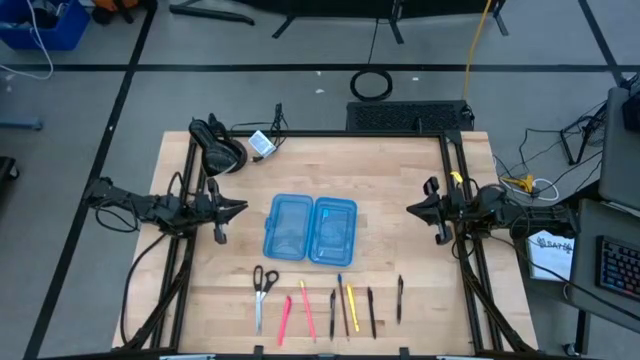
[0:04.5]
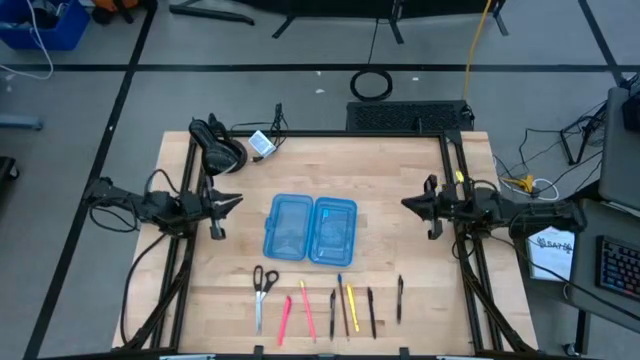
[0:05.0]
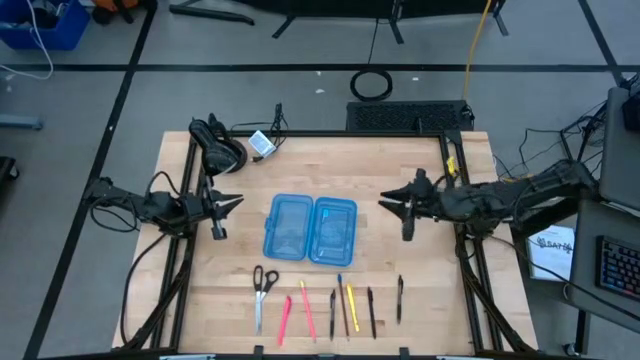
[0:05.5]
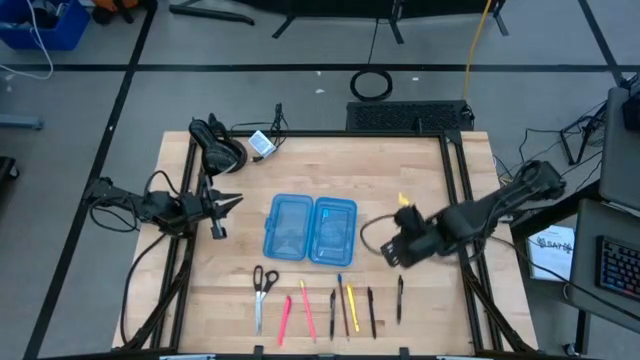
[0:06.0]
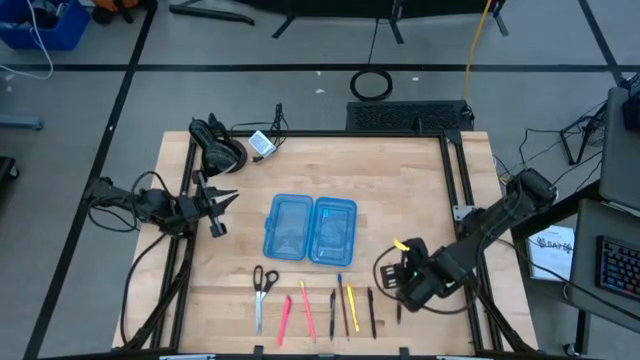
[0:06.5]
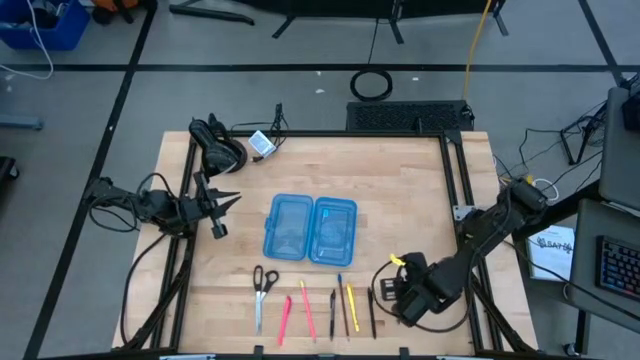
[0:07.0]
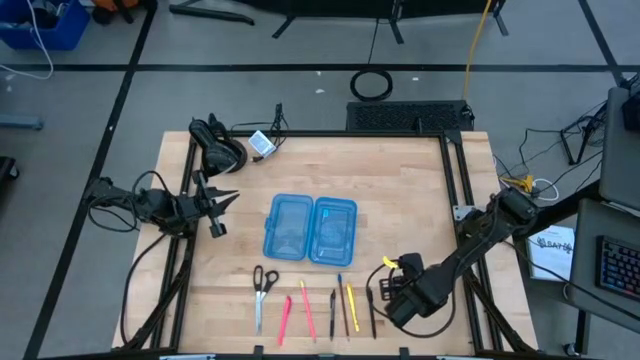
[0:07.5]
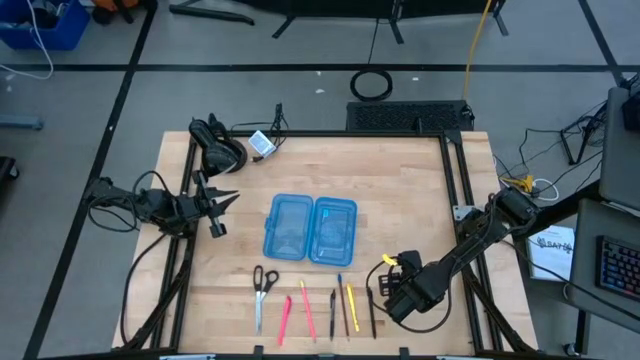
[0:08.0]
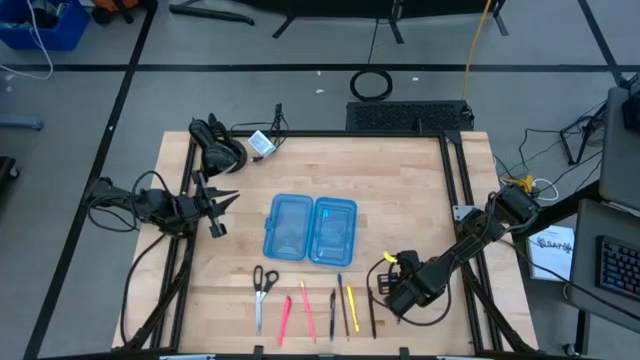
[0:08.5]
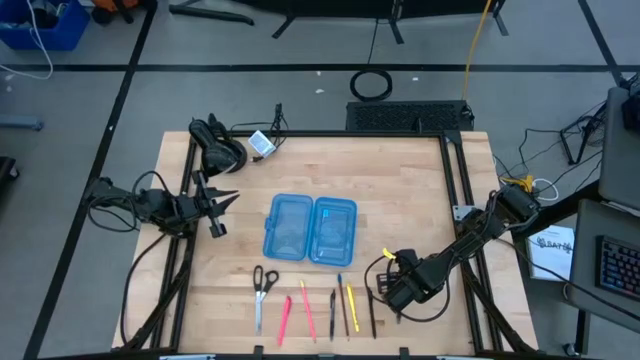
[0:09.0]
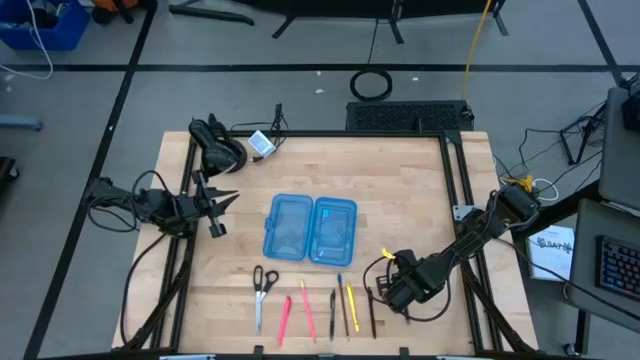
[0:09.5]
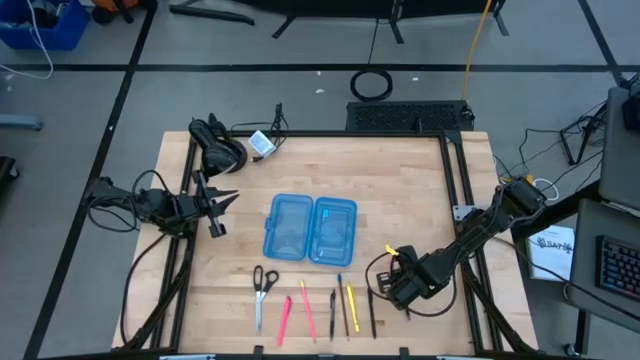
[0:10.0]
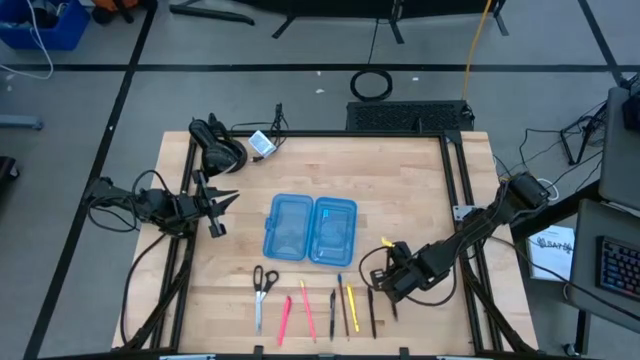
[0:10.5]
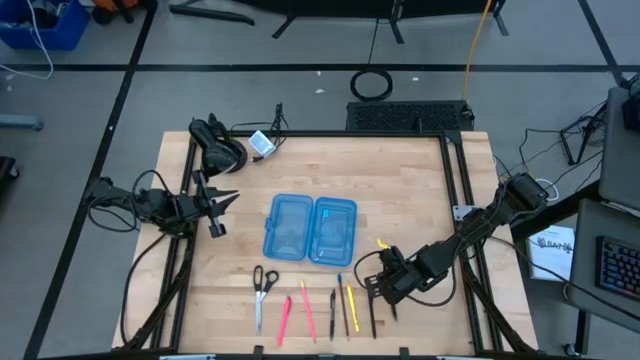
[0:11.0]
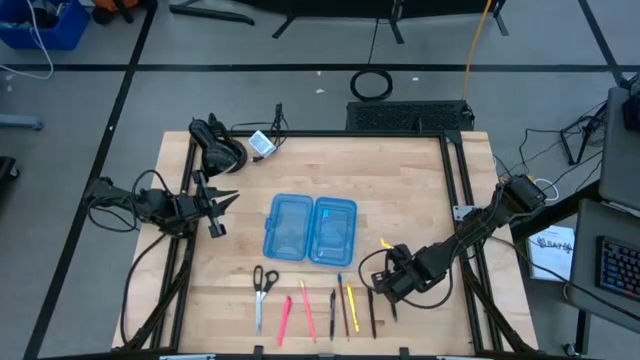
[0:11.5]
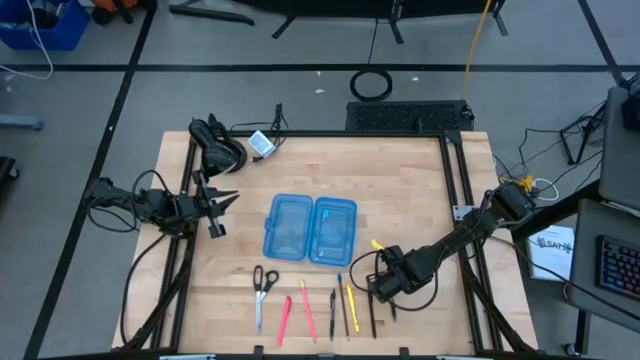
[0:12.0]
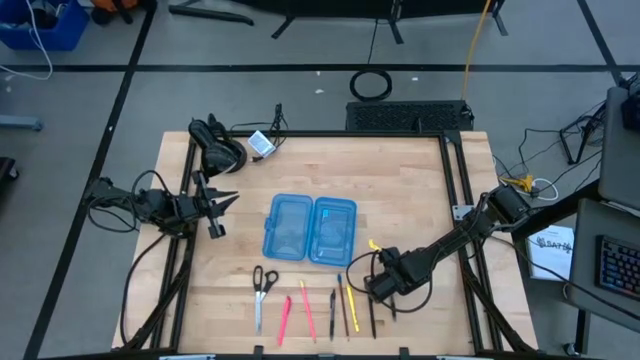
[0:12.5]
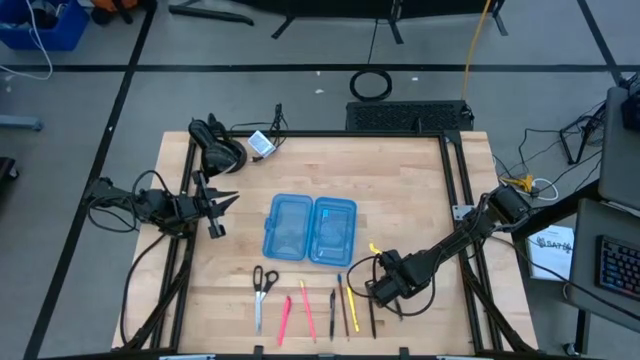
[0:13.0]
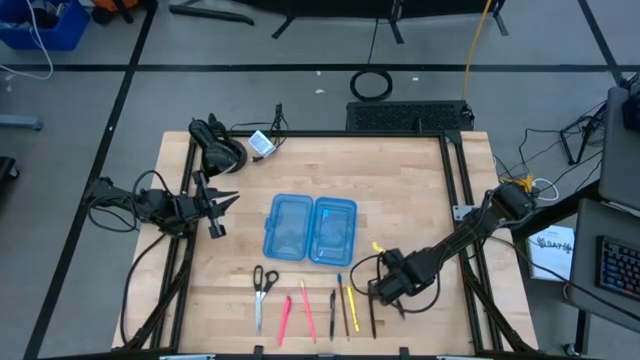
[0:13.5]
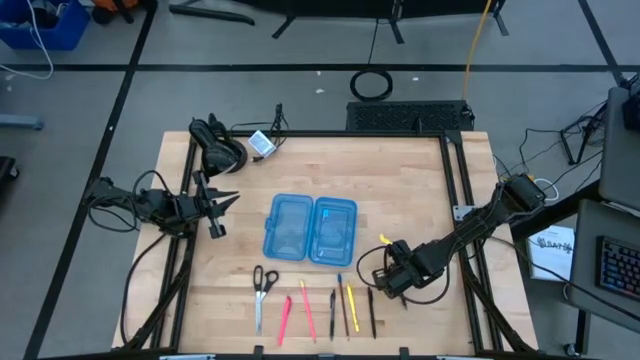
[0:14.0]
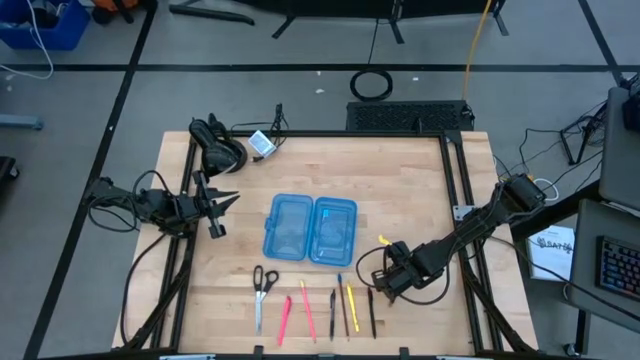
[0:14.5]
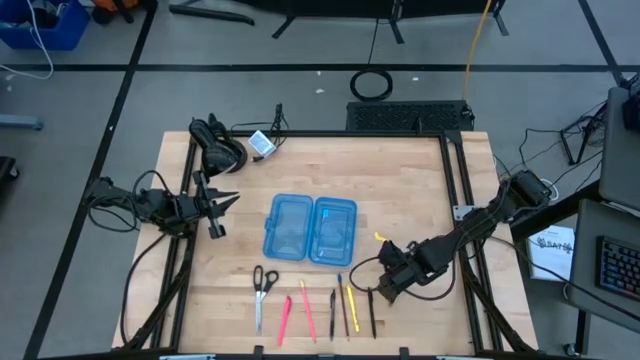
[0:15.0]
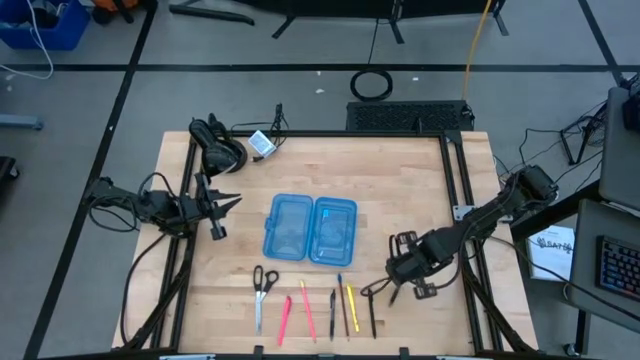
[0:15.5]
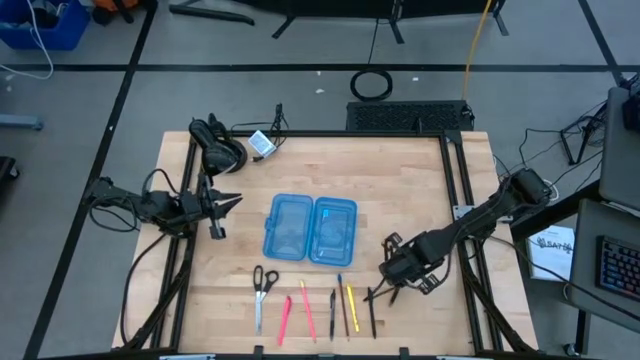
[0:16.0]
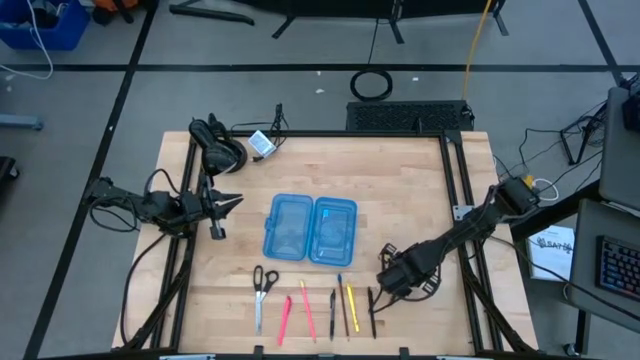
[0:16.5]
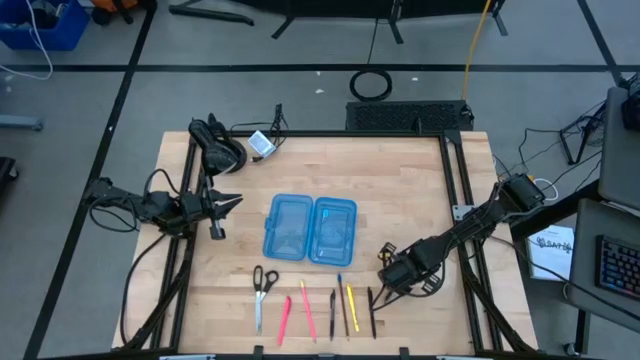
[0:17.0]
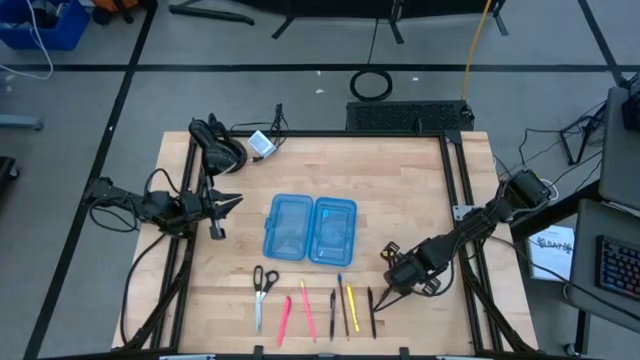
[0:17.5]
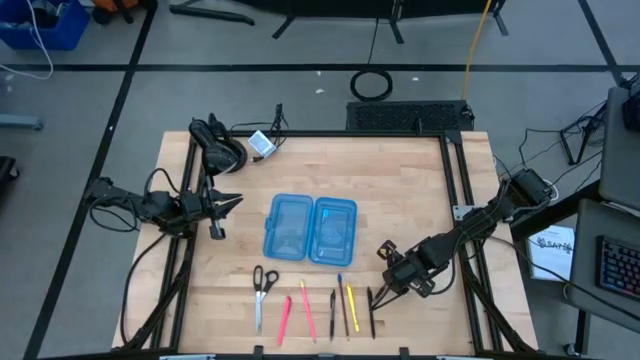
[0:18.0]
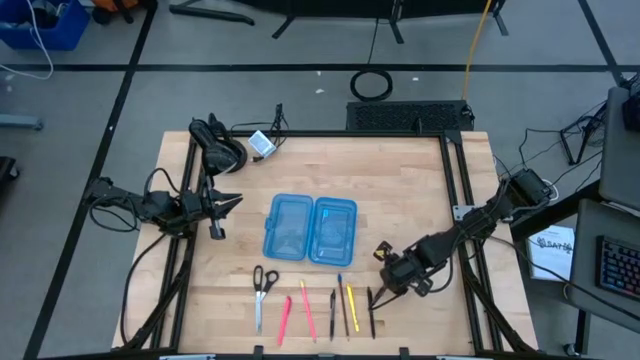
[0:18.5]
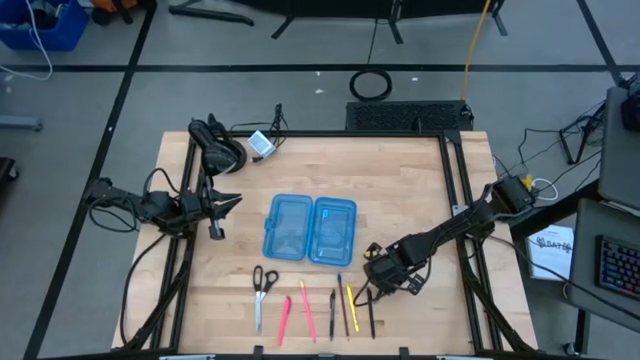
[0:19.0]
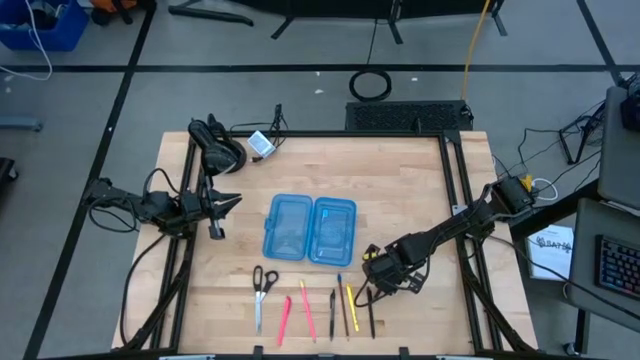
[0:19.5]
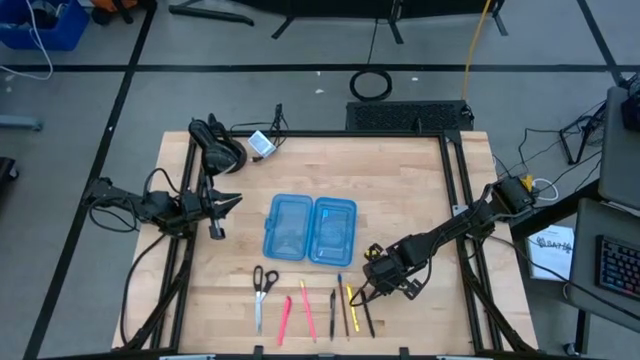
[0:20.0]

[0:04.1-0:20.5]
Task: Pick & place school supplies into a supply box
Put the right black pen into the blue supply box

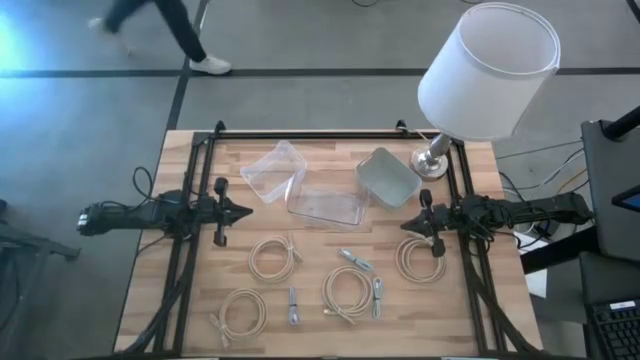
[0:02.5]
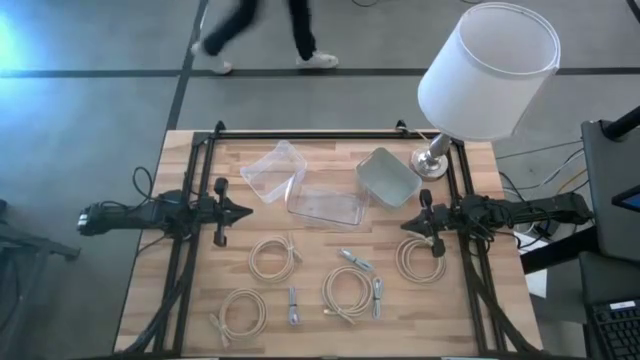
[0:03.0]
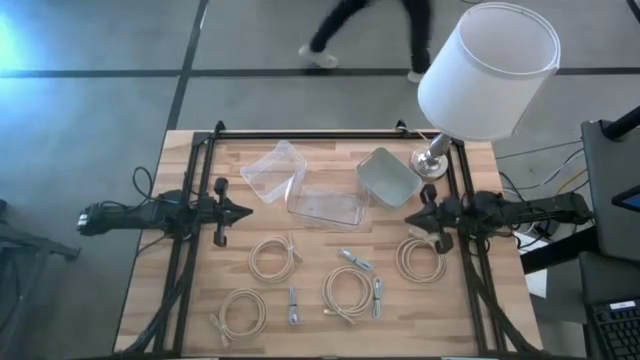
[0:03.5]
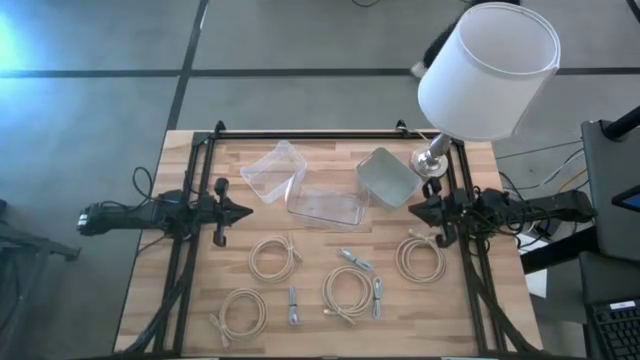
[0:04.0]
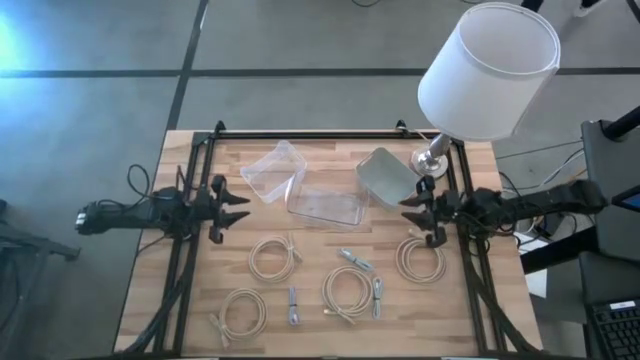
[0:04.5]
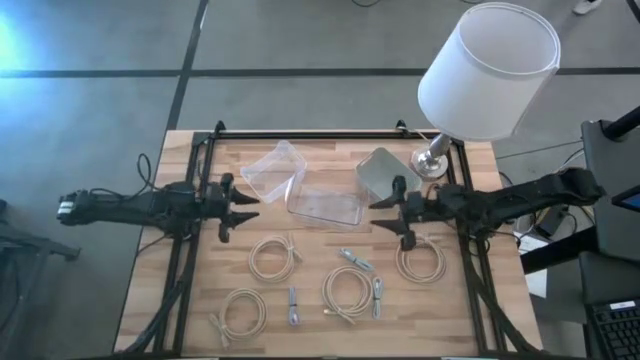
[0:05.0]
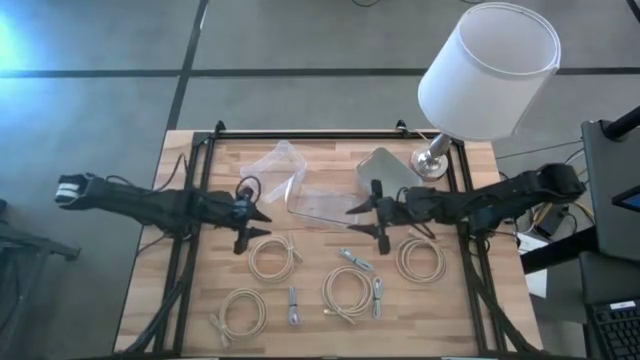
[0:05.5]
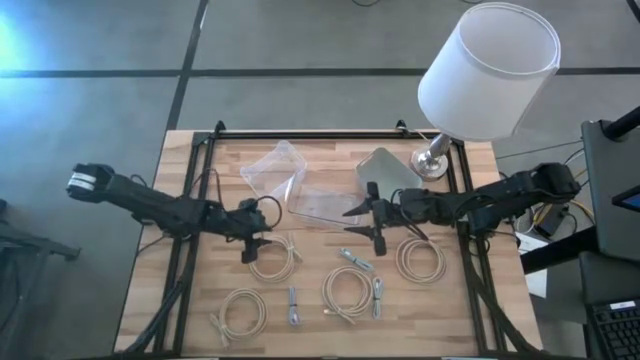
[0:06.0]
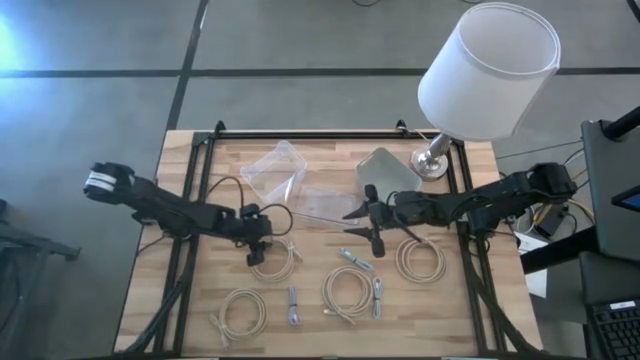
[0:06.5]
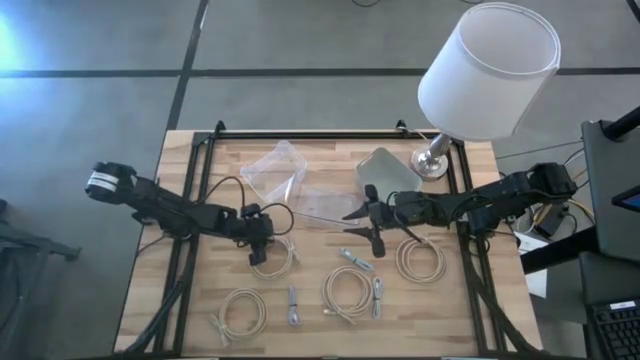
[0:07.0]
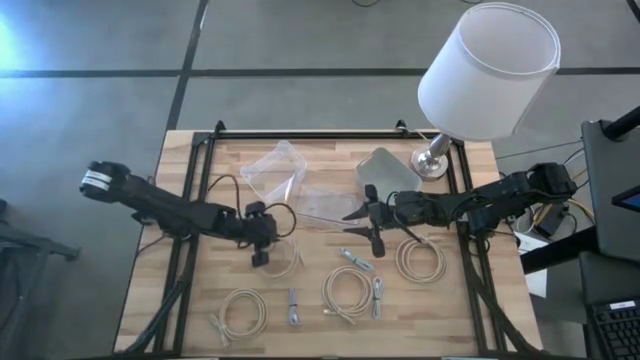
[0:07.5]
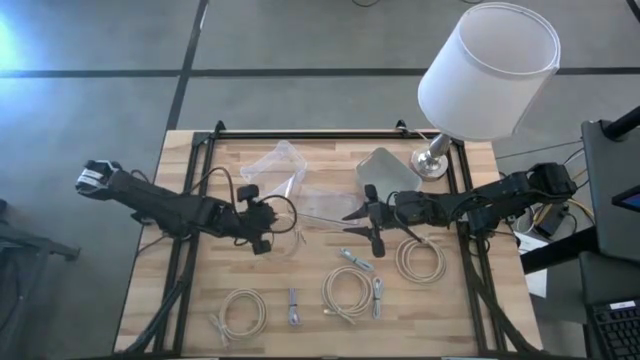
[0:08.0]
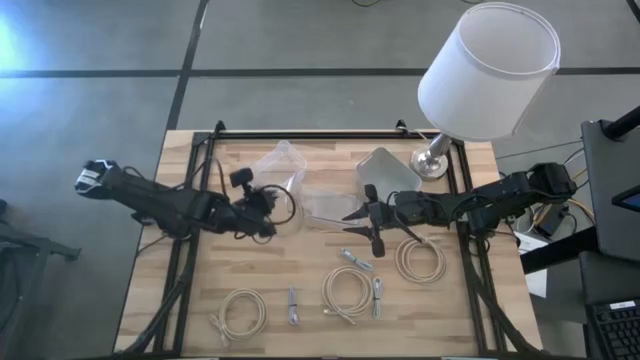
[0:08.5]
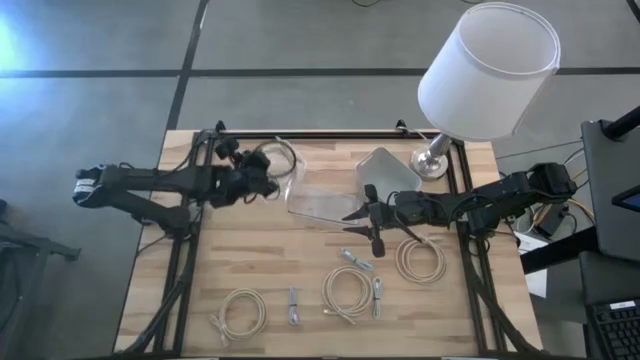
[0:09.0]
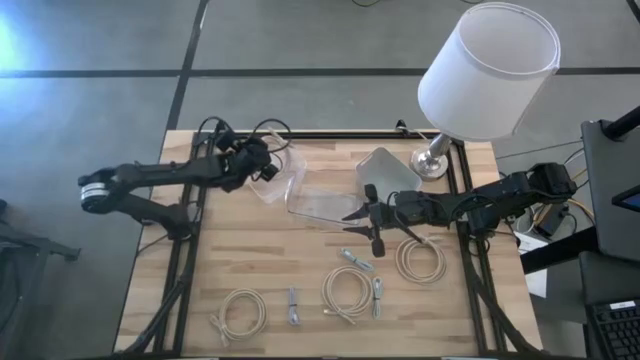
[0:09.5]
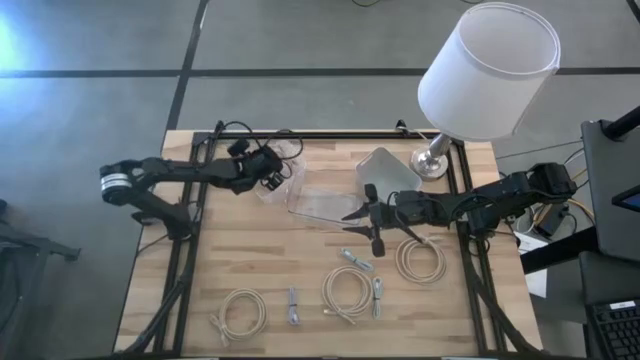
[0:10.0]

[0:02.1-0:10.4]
Task: Pick & Place USB Port
Put the brown USB cable into the white bin
